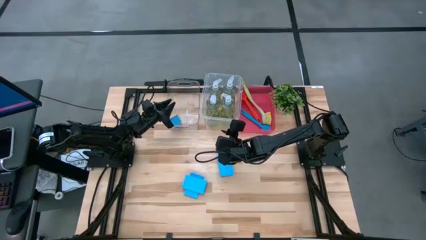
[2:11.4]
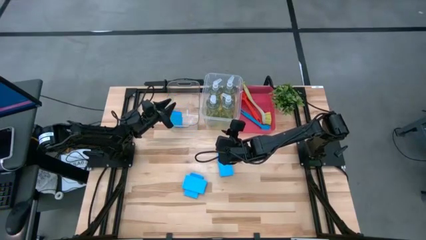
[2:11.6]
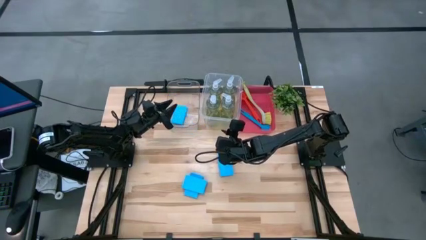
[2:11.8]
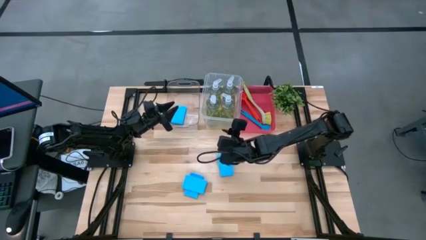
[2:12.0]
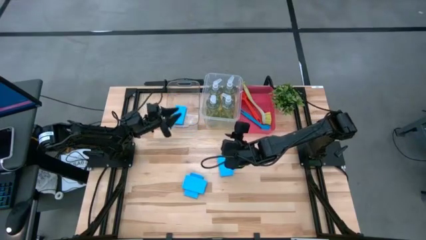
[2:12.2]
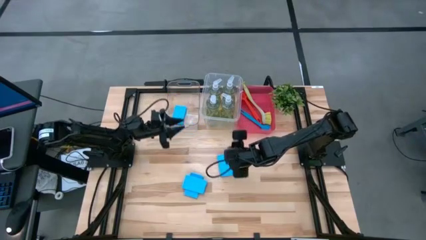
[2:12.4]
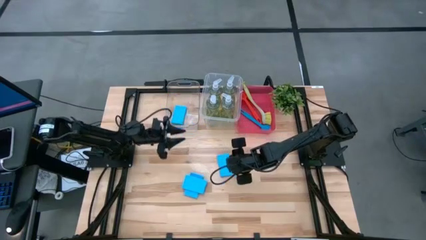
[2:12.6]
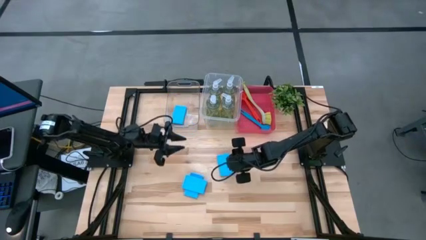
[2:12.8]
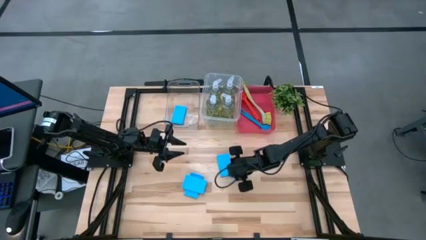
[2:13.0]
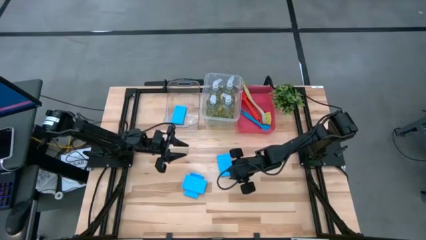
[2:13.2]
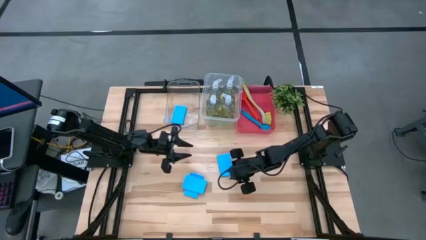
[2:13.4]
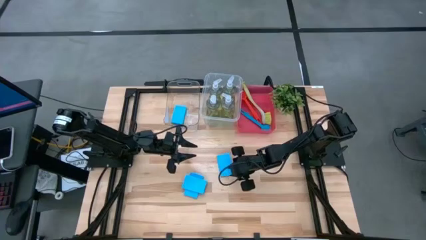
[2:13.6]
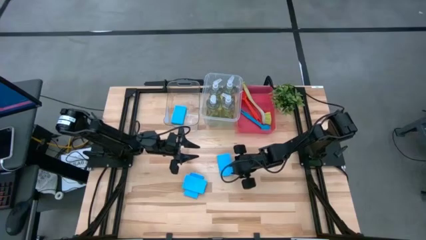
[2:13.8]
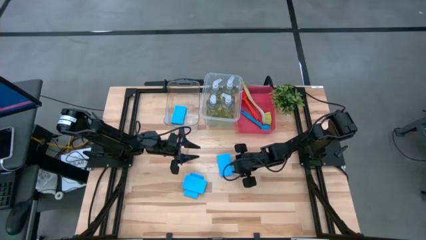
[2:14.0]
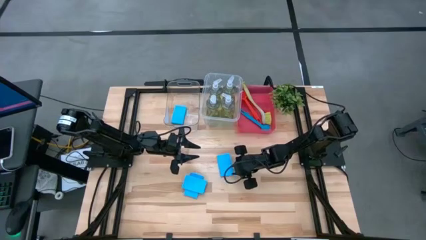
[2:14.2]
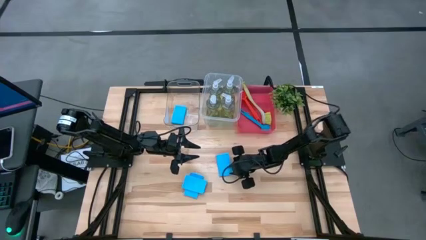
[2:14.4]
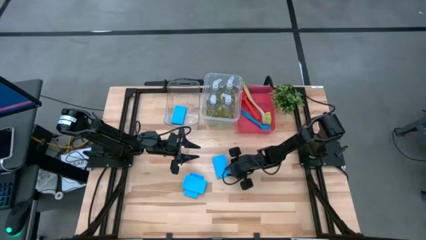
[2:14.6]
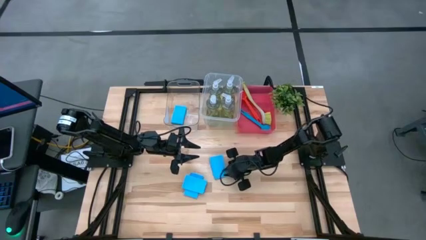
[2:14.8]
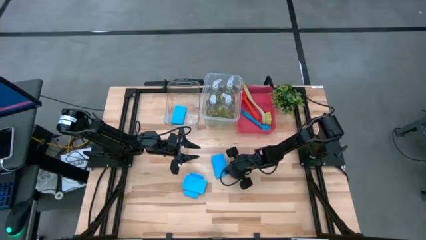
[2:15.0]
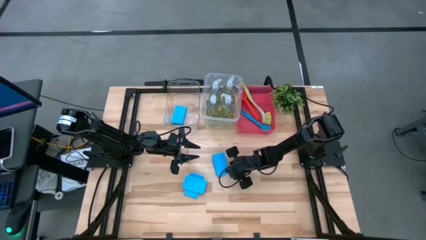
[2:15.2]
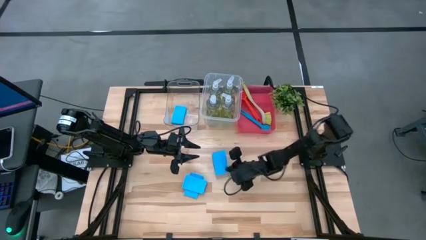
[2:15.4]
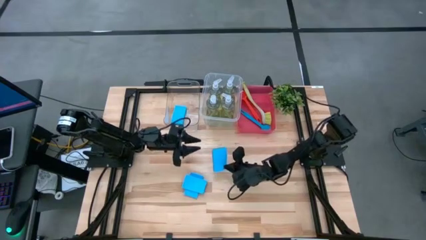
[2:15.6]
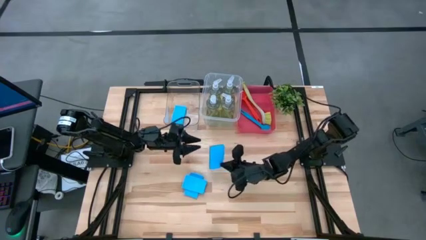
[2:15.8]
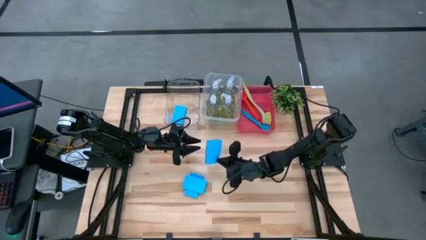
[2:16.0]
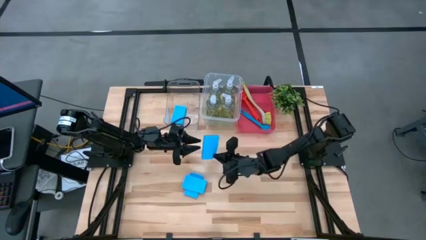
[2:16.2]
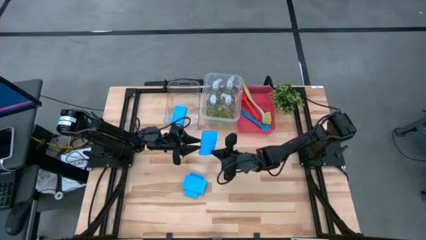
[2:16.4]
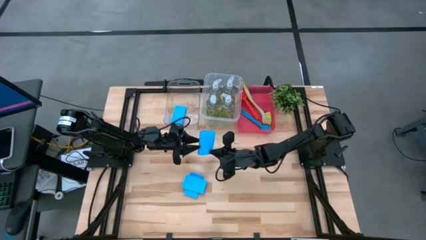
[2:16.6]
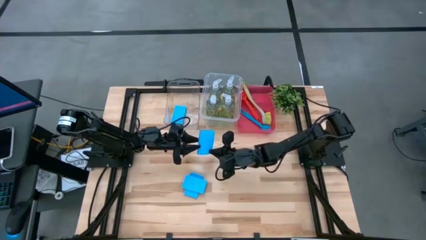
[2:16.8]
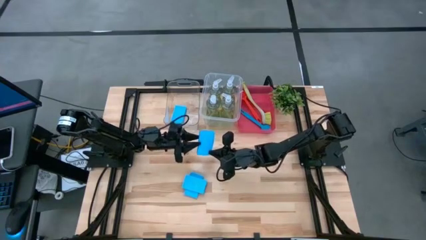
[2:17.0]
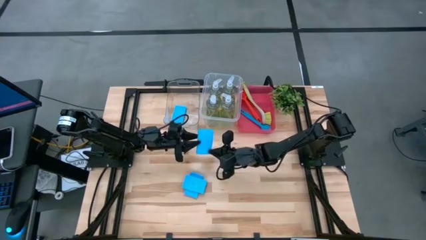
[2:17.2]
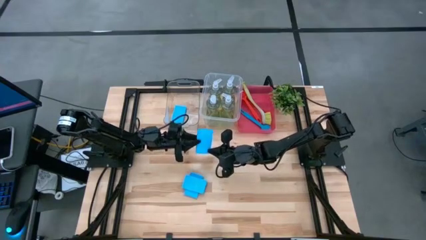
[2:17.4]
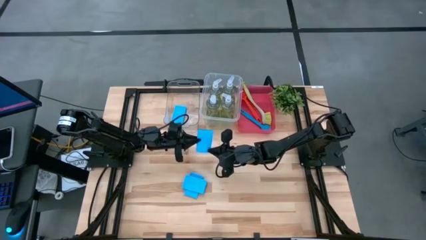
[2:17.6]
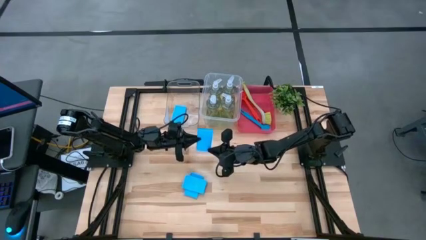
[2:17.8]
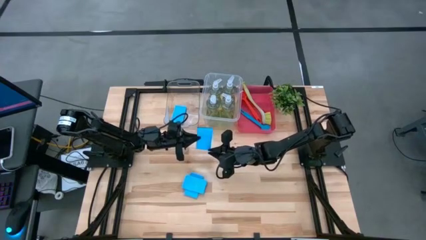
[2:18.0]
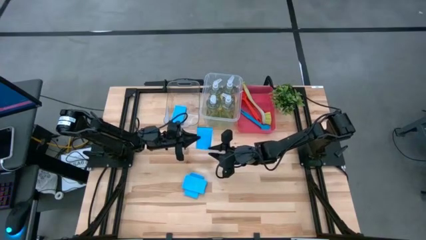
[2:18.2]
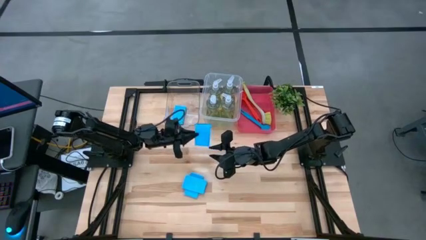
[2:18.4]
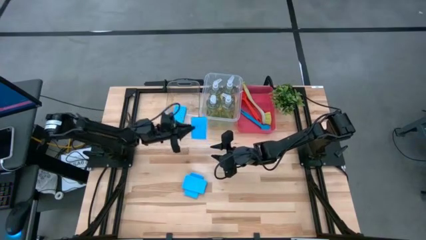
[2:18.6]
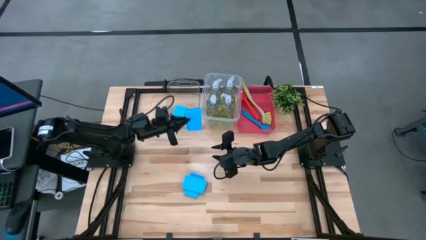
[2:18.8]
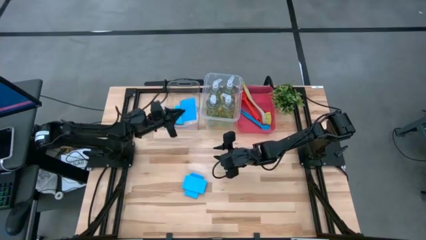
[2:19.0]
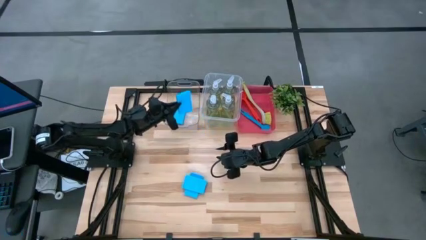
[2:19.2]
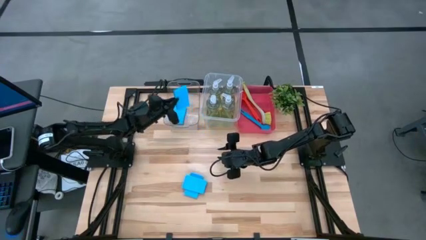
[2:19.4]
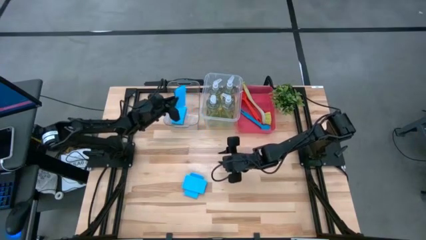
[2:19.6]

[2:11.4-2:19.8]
Task: Pick & Place Kitchen Sink Supplies
Put the blue sponge into the transparent bin

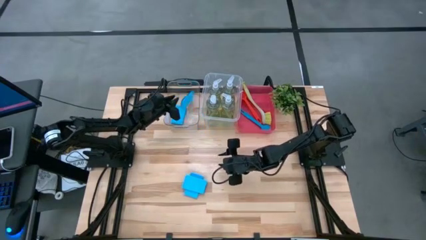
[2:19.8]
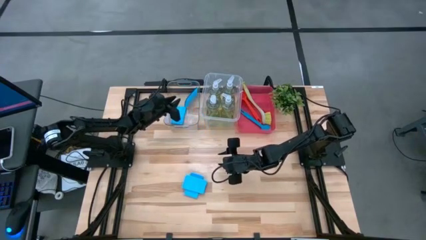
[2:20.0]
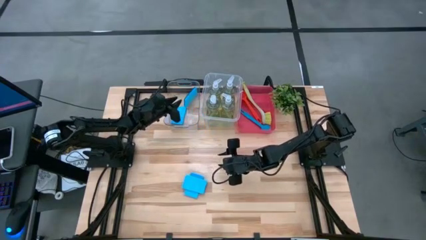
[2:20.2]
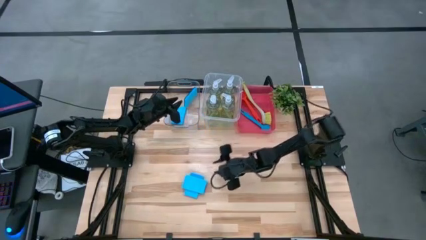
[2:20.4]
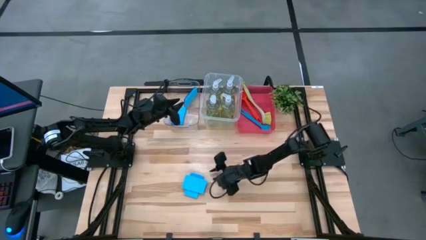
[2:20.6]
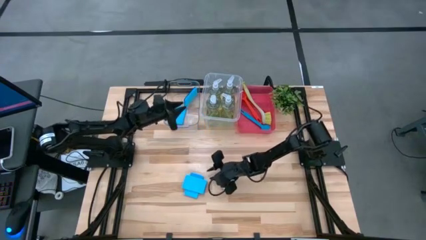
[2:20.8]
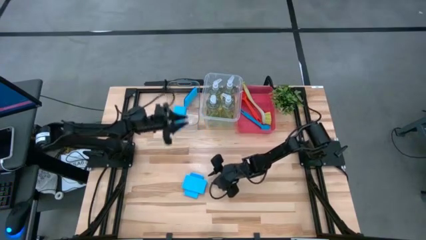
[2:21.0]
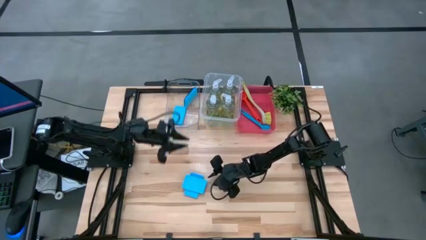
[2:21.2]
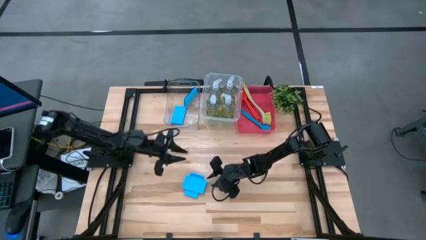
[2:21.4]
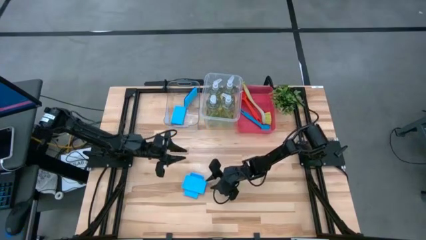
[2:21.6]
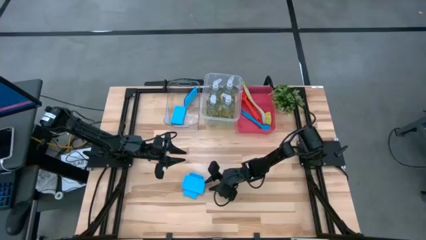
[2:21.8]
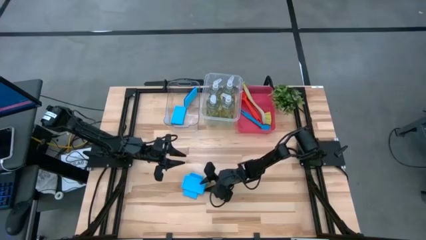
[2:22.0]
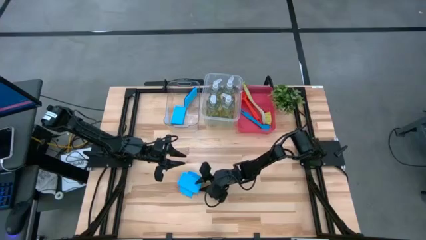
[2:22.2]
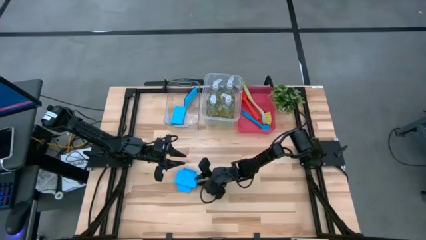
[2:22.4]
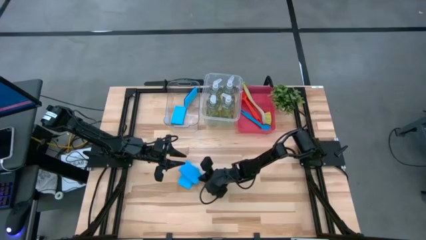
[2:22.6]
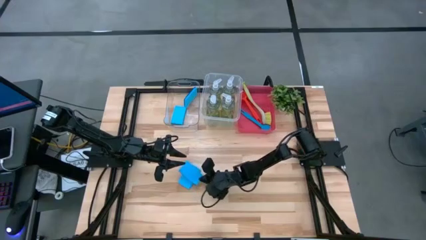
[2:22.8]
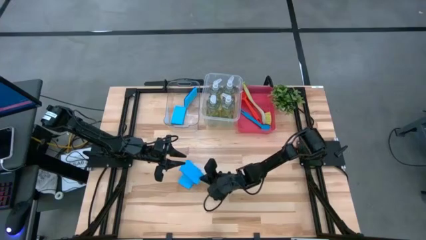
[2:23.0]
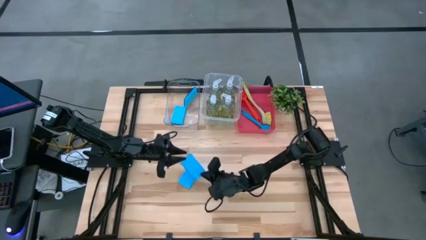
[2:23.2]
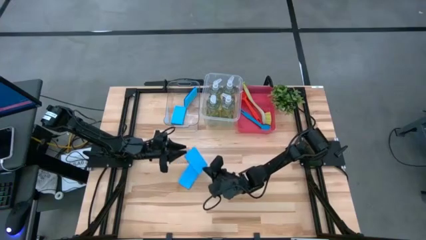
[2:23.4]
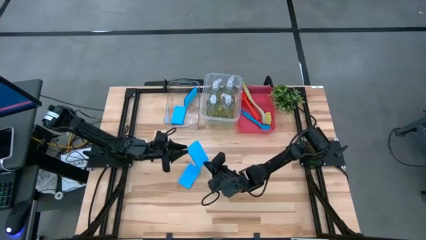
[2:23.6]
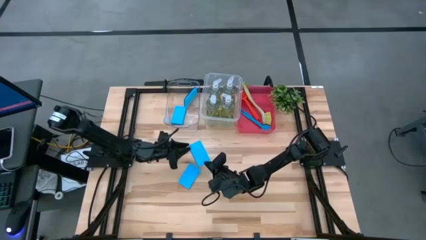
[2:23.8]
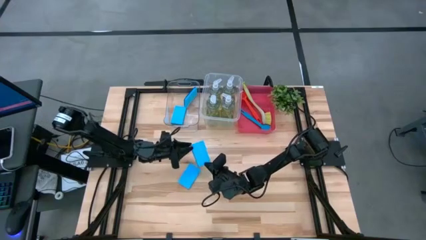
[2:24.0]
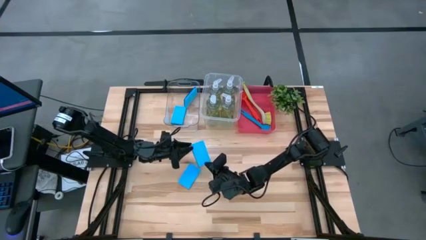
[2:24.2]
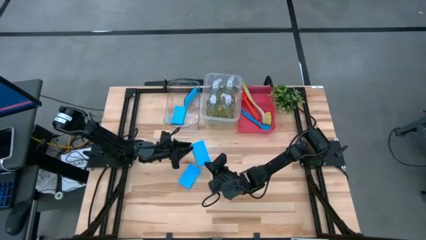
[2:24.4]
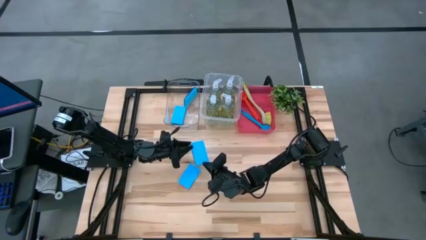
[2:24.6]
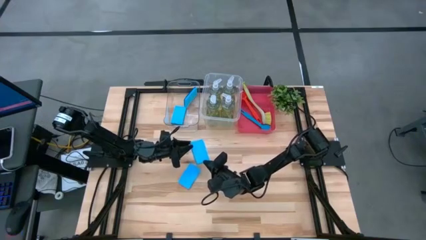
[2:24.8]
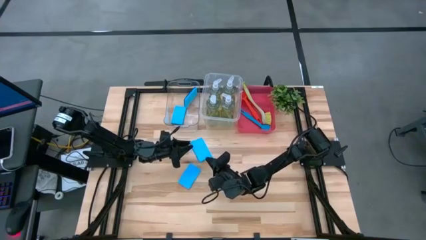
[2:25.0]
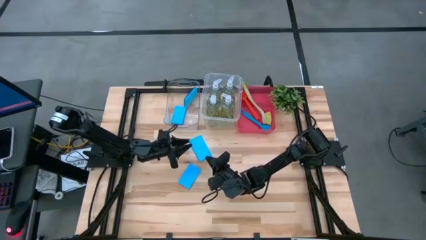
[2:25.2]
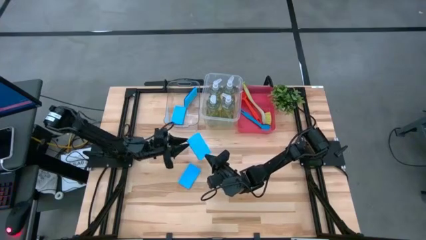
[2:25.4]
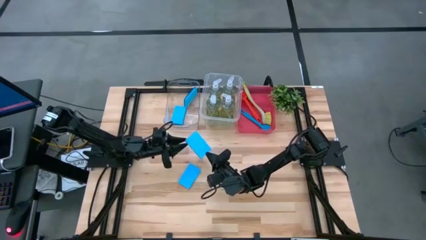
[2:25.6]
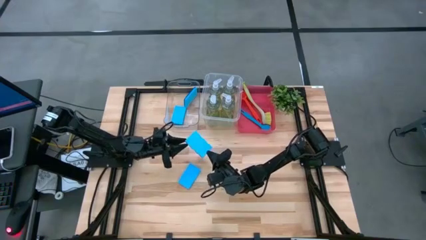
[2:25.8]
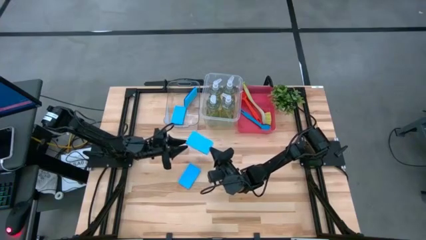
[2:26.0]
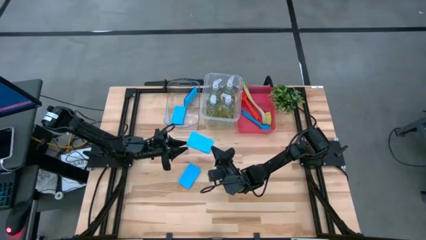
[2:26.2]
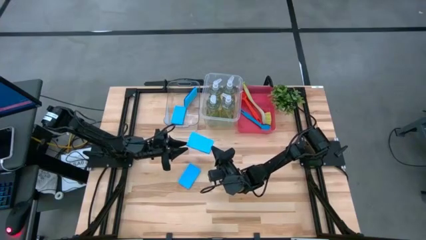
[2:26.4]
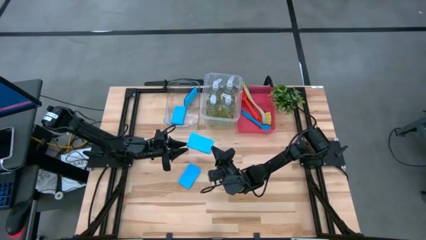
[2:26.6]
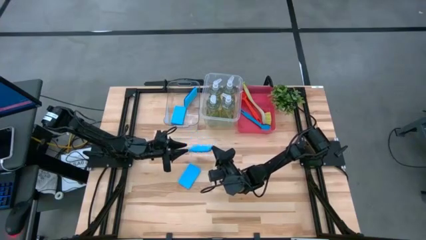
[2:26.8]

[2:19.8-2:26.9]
Put the blue sponge into the transparent bin

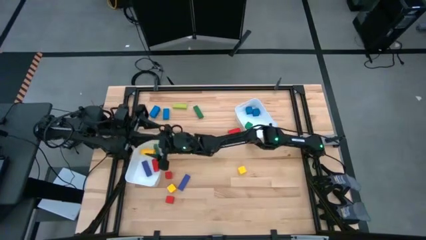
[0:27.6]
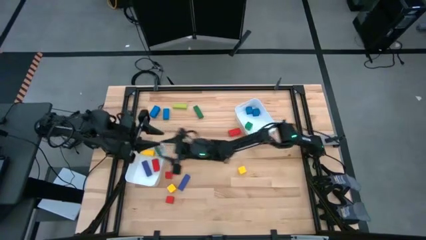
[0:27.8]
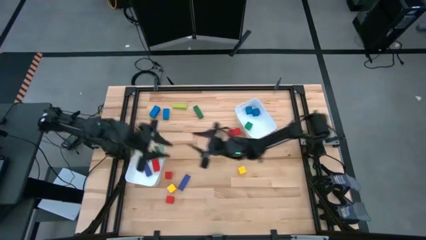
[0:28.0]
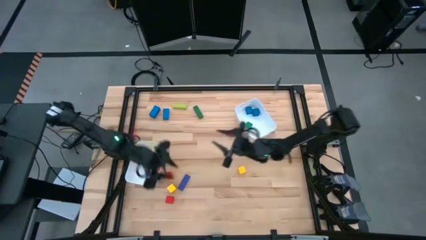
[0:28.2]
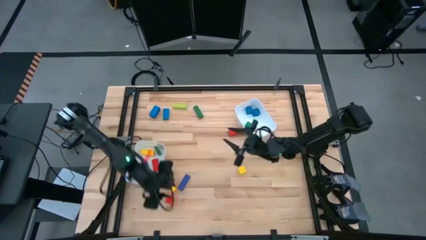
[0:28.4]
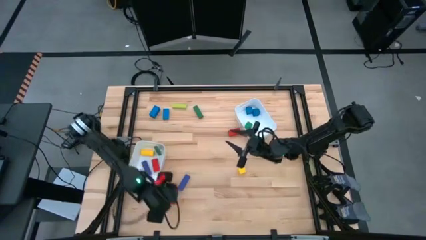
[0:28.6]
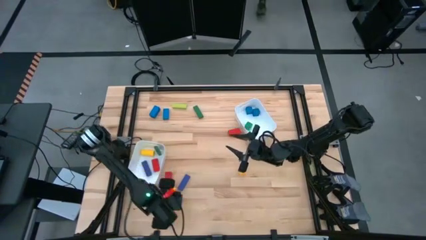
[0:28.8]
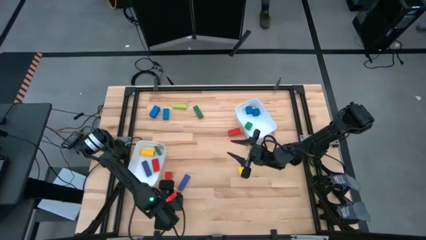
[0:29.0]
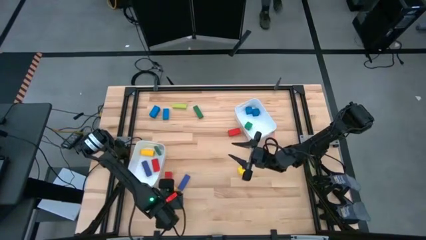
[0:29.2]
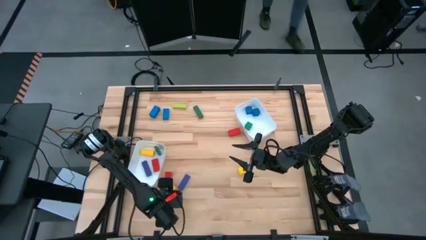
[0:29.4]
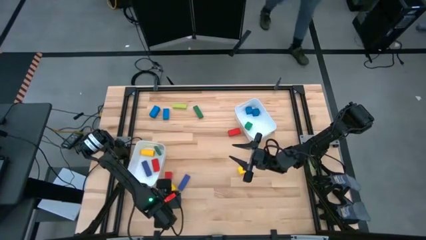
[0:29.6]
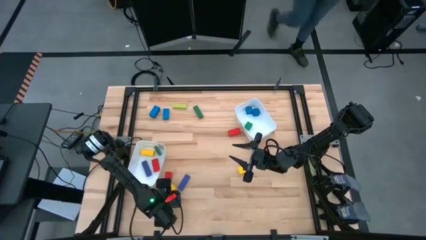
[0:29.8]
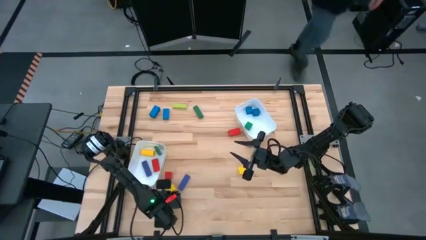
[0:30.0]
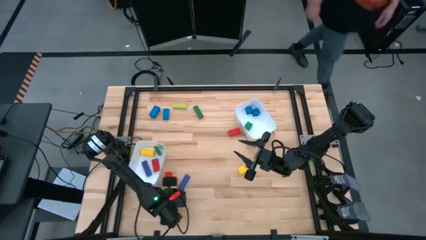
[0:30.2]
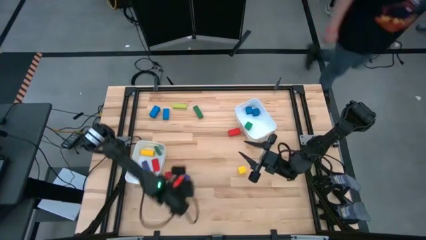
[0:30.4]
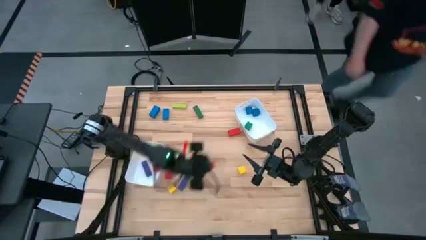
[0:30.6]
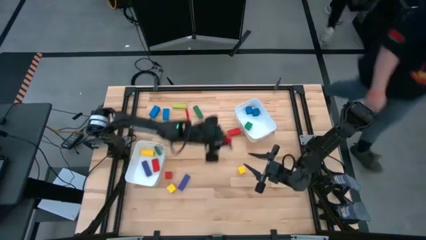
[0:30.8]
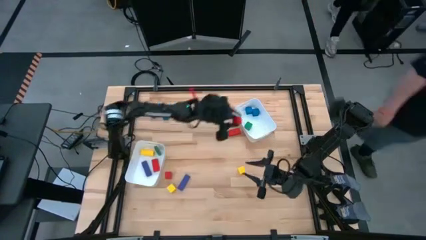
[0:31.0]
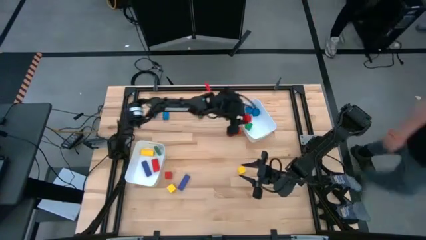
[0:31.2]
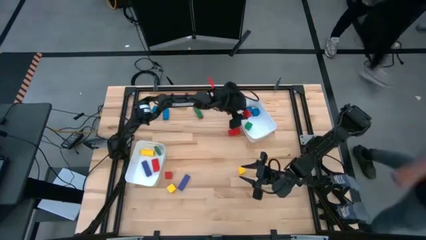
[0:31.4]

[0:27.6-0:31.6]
Task: Sort blocks by size
Put the small red block into the right white bin
